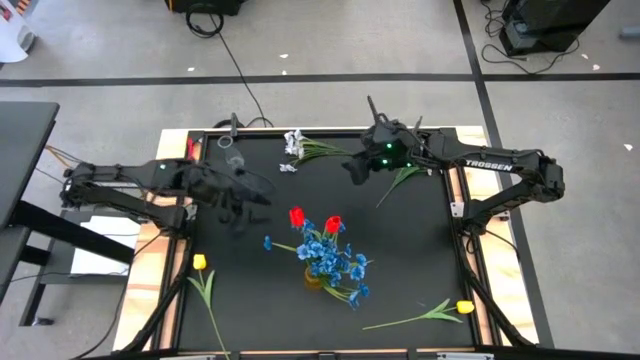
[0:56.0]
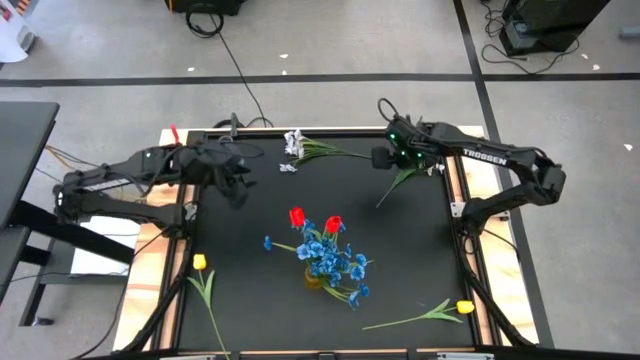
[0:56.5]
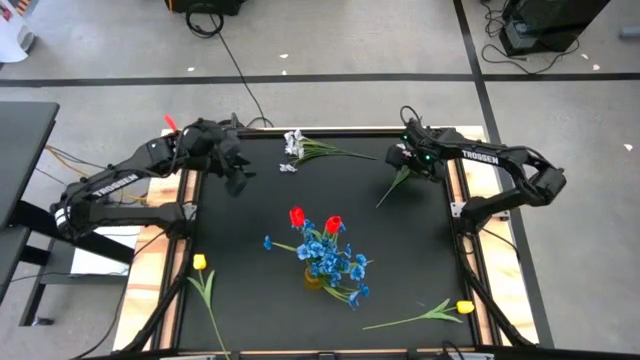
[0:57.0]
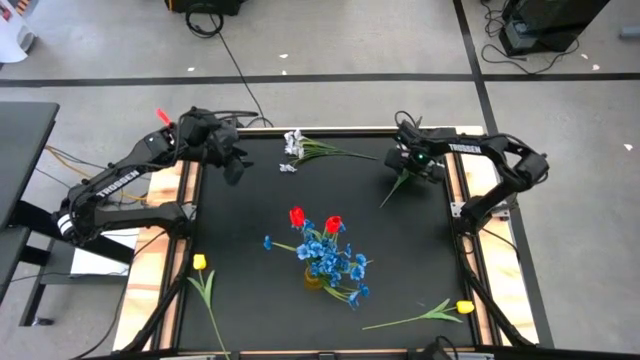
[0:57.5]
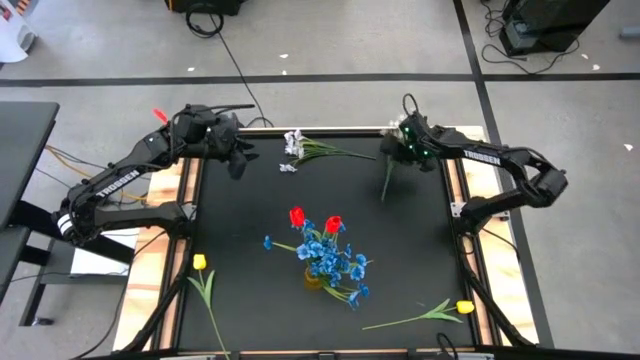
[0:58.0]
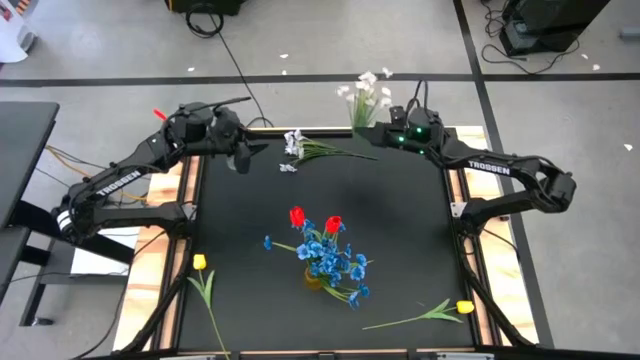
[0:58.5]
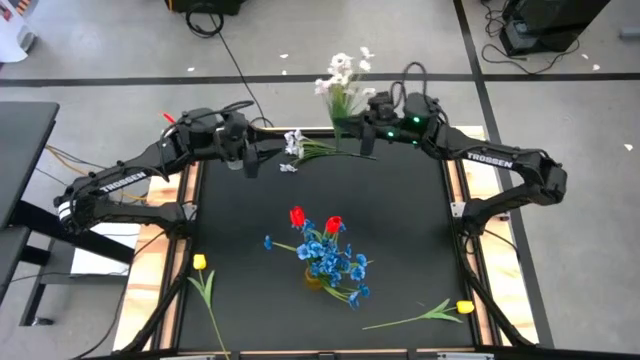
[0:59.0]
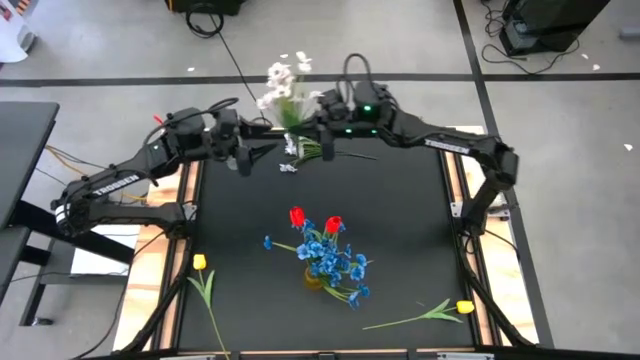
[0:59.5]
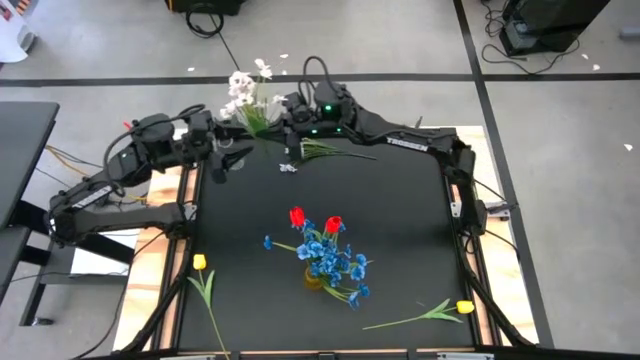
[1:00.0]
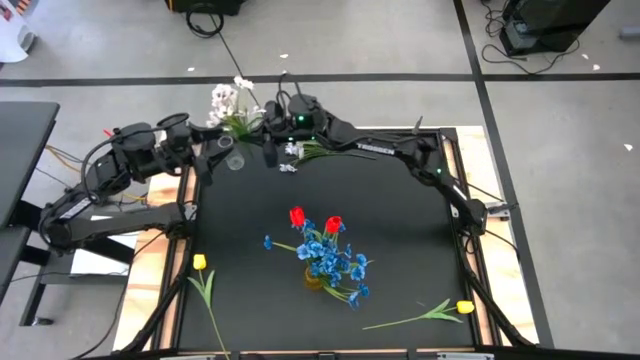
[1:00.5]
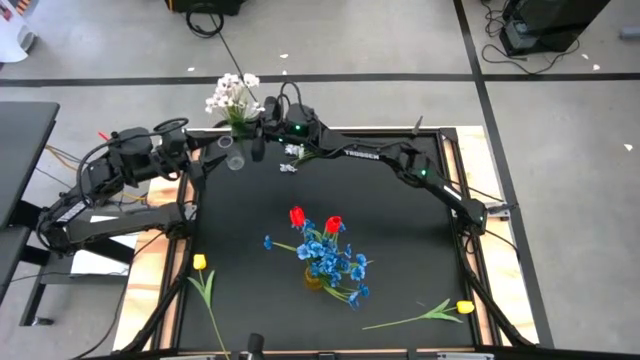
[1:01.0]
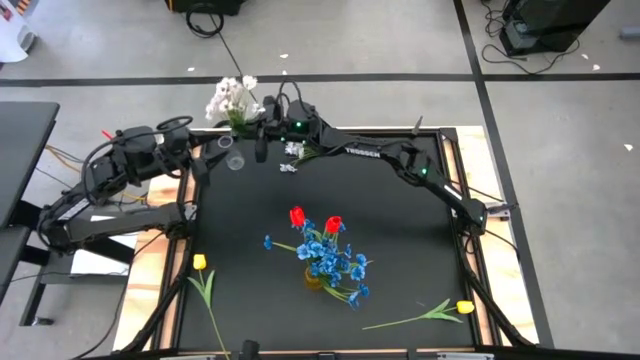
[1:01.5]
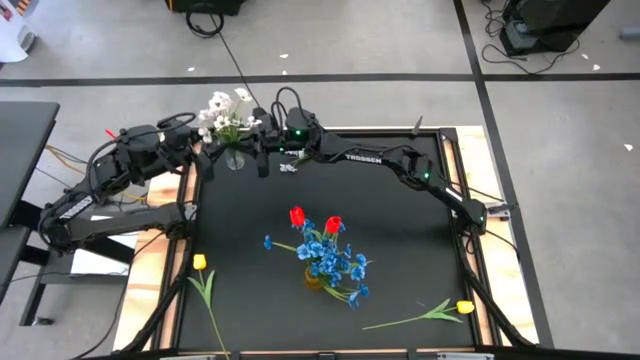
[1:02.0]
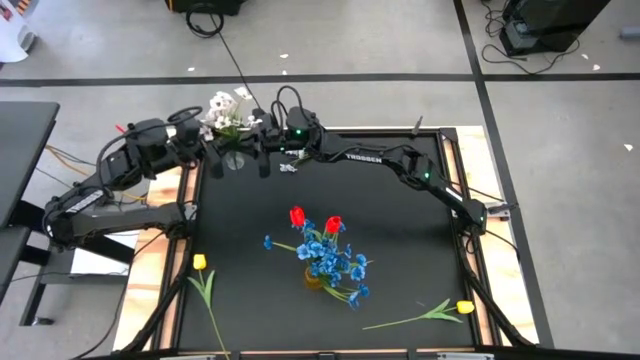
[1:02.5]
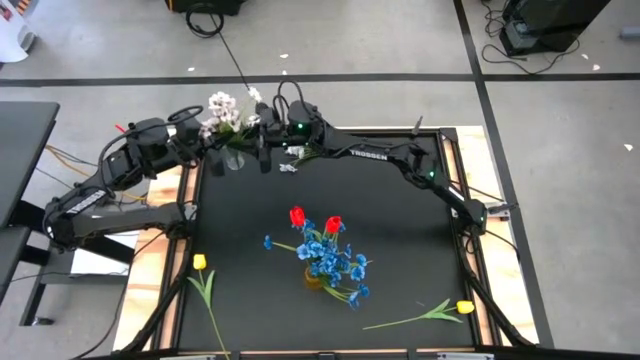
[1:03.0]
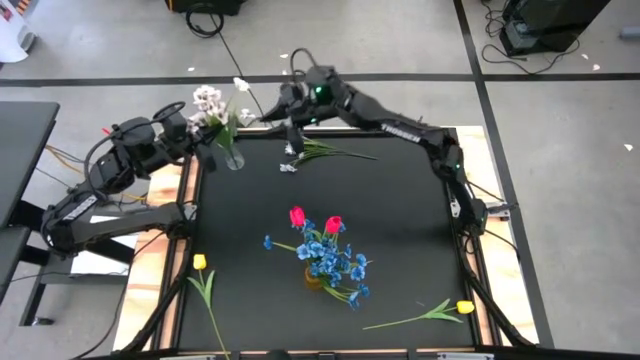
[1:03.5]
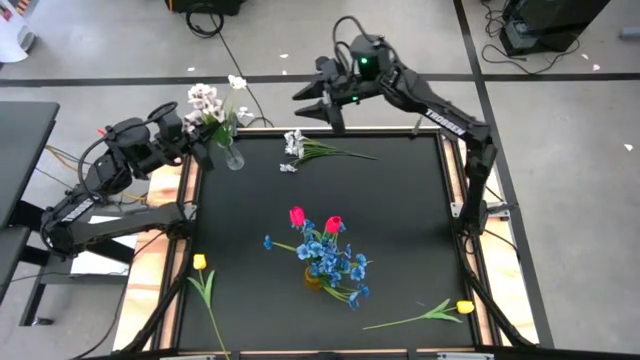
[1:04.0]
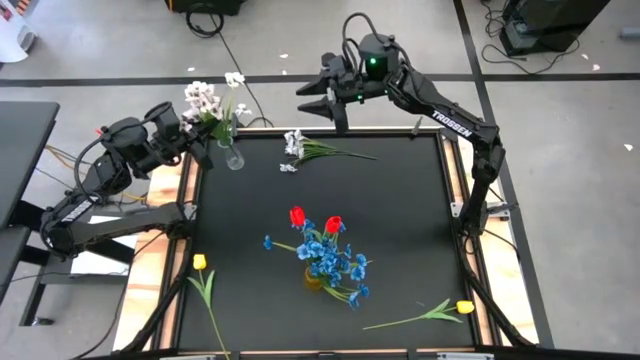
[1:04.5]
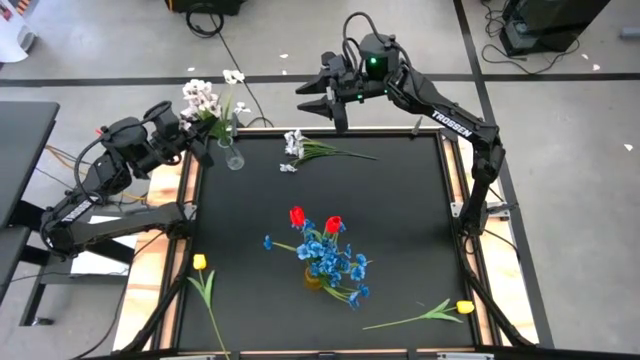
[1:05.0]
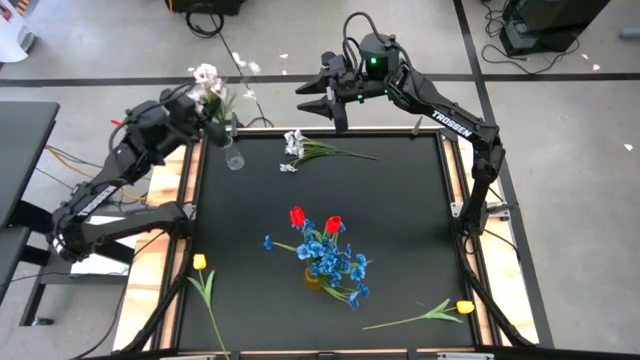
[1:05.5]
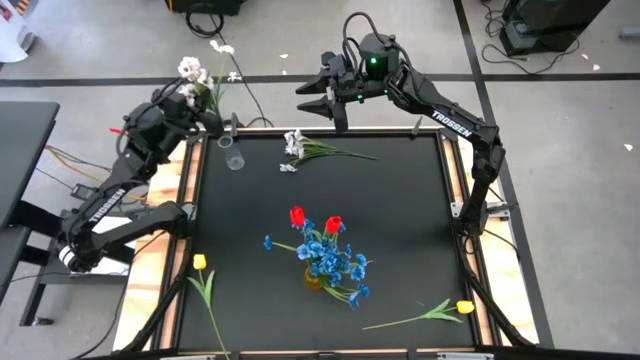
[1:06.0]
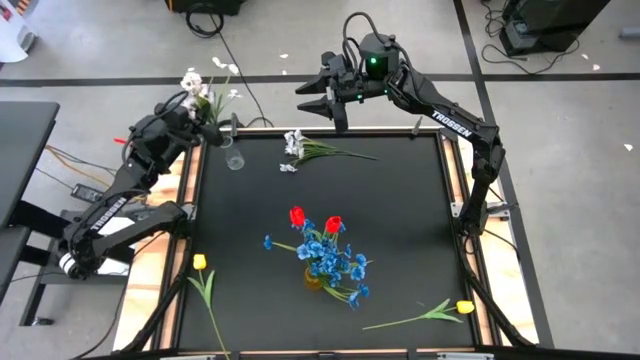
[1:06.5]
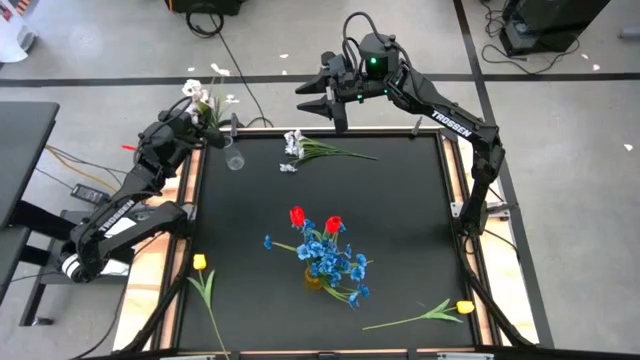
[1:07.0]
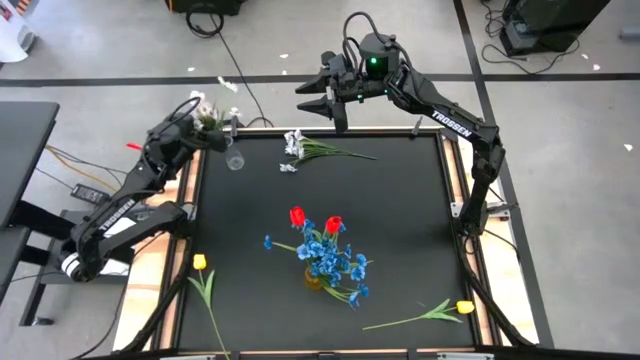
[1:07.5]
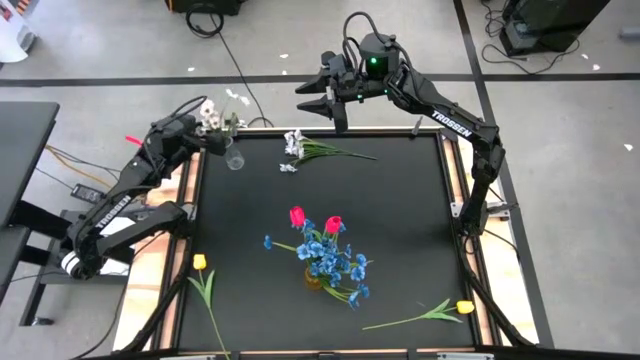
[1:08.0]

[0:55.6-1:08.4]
Task: Sort flowers into vase by color
Put the right white flowers into the transparent vase

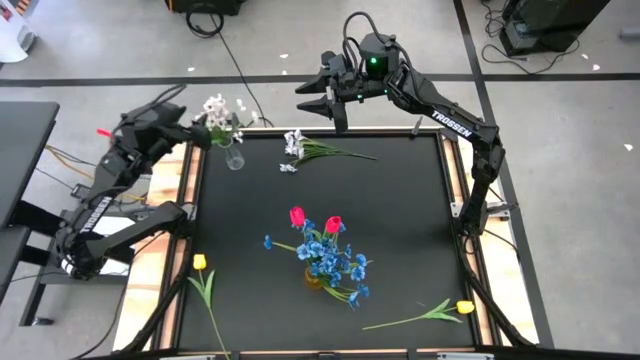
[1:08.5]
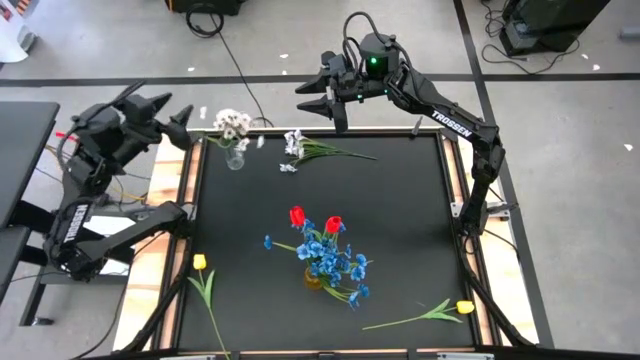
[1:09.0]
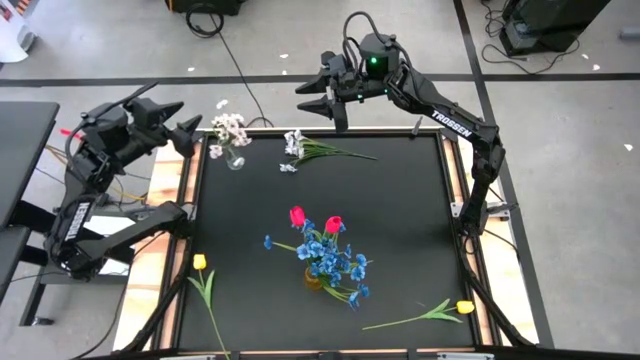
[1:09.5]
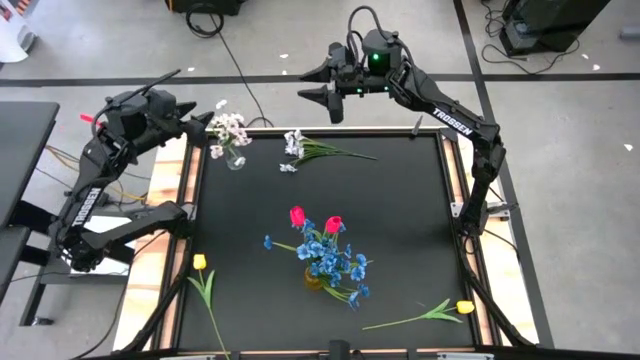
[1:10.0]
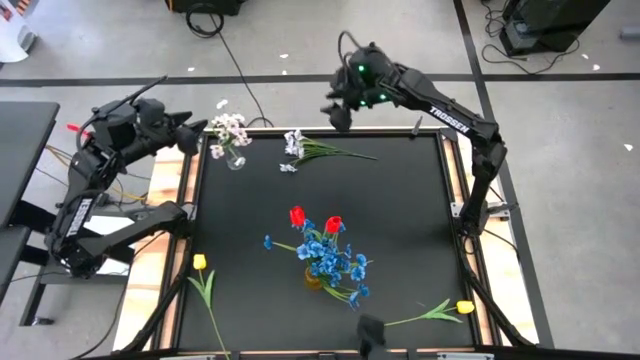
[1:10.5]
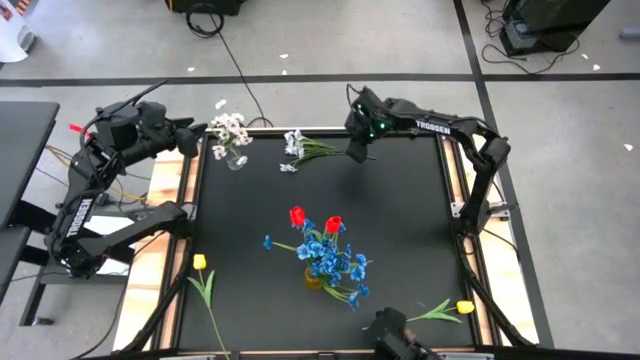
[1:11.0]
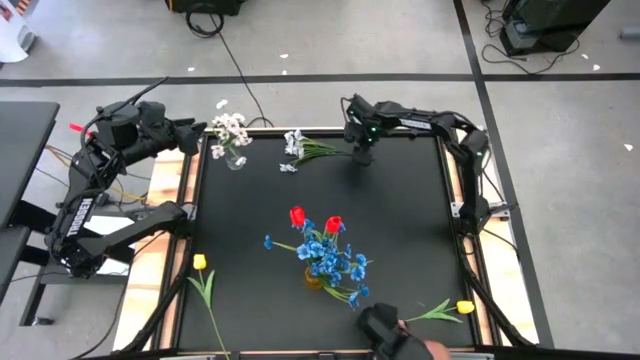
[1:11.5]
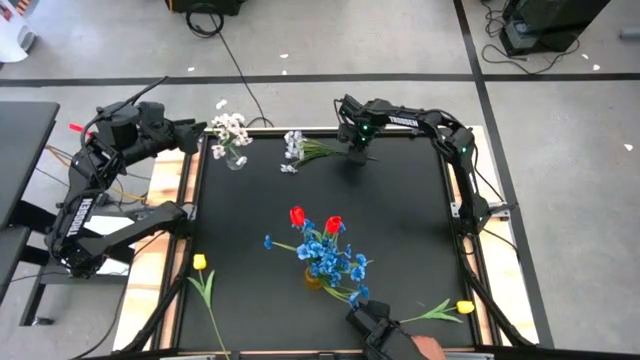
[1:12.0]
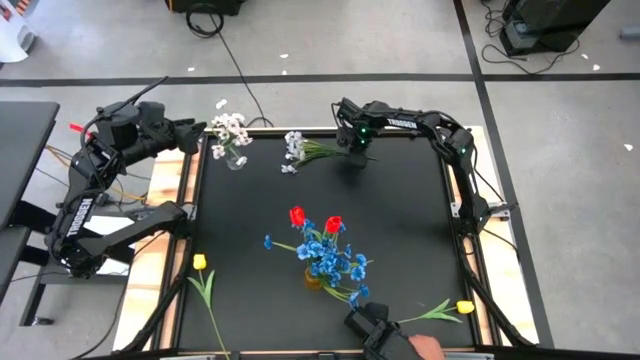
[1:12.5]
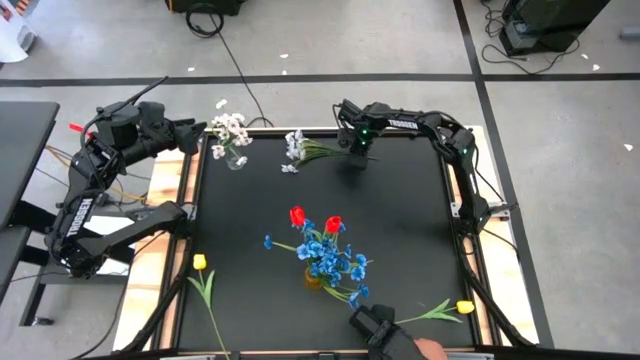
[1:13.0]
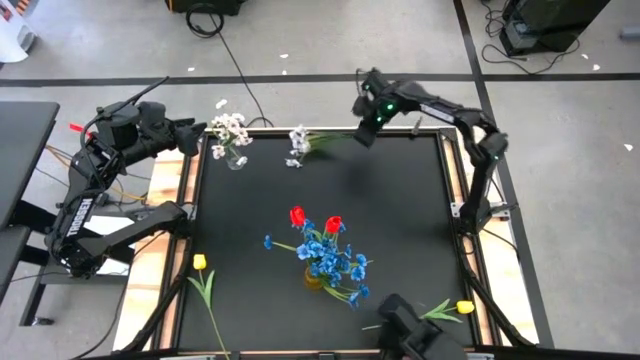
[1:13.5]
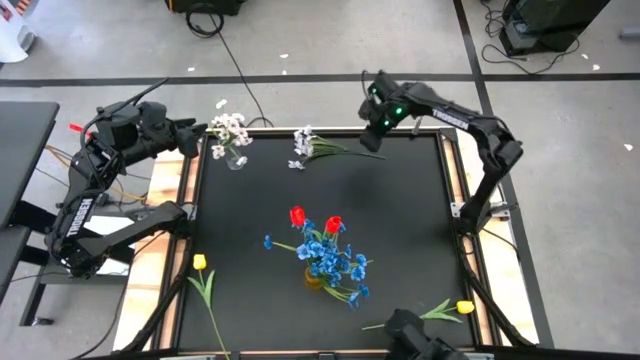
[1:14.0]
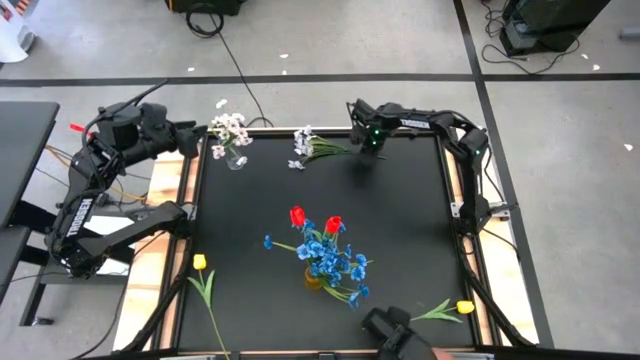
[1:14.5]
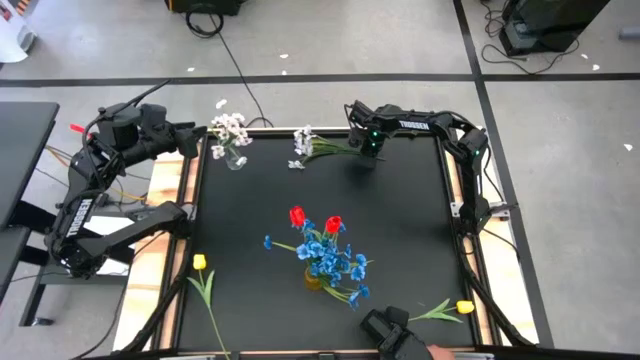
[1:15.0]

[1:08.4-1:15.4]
Put the white flowers into the transparent vase

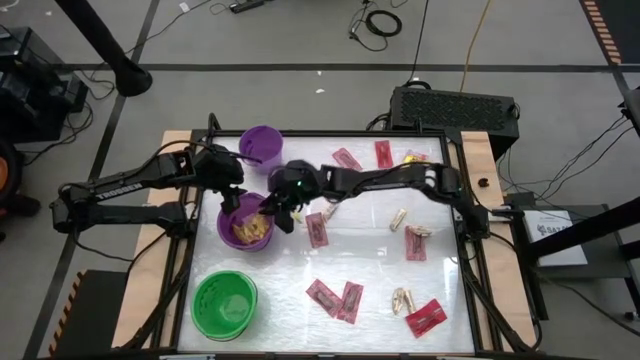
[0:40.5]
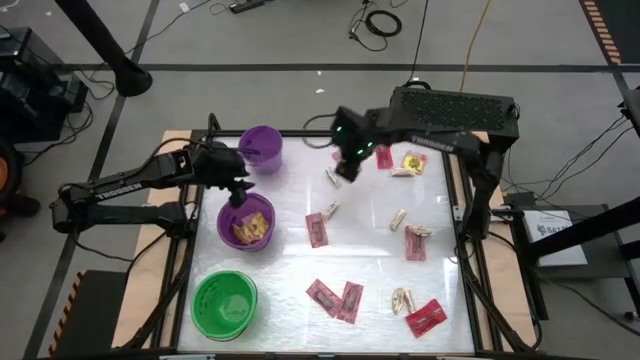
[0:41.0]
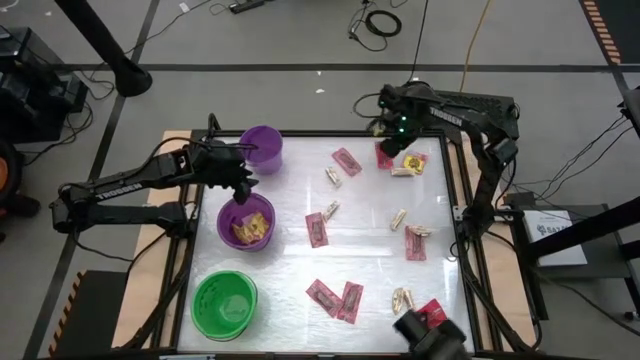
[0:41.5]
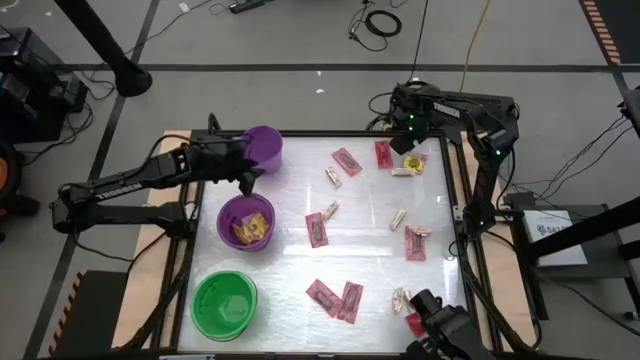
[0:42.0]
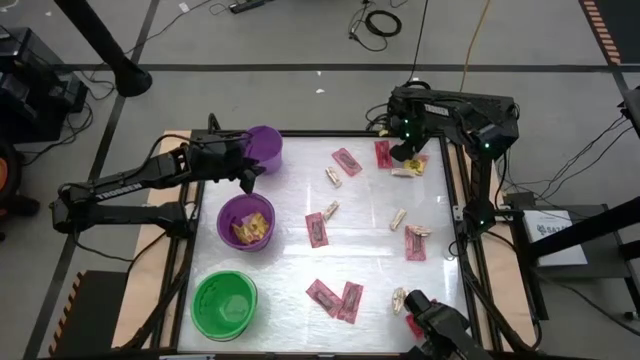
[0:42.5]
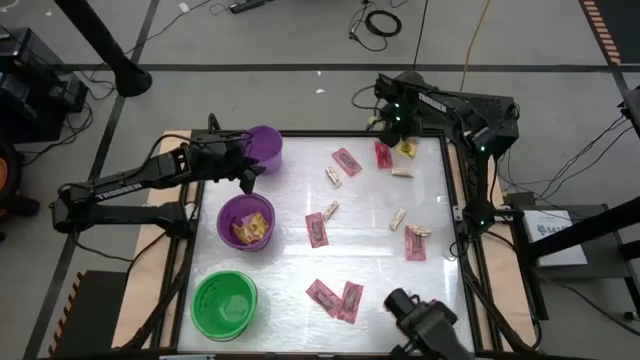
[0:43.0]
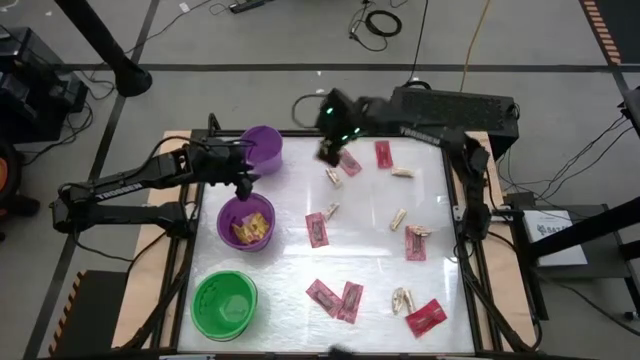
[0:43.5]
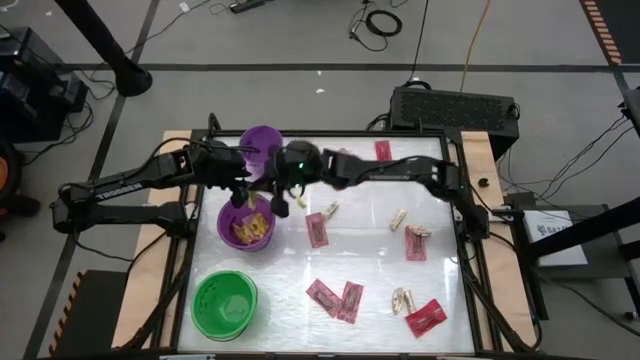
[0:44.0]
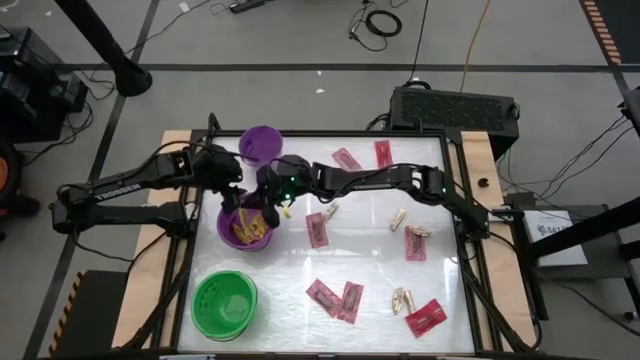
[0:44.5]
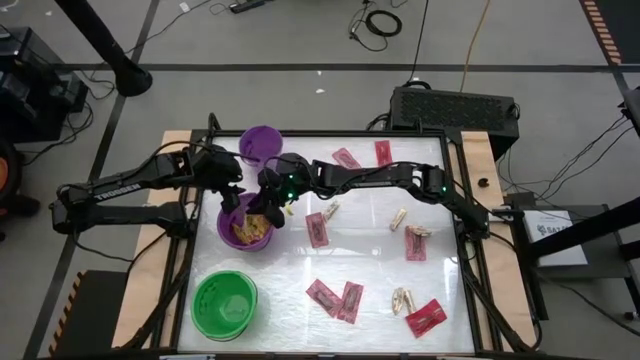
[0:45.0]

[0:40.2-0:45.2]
Task: Sort candy by brand, put in halloween buckets
Put the yellow candy into the bottom purple bucket
